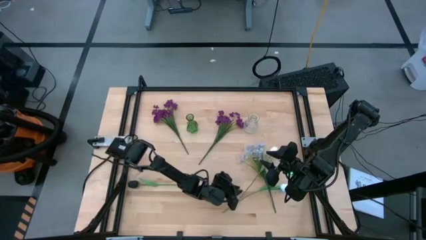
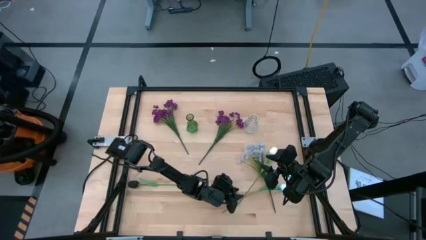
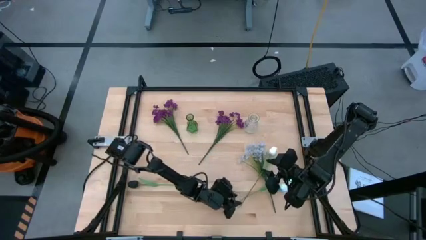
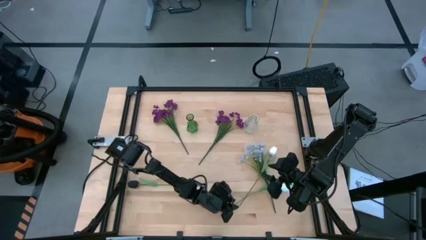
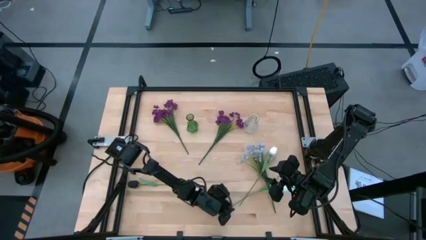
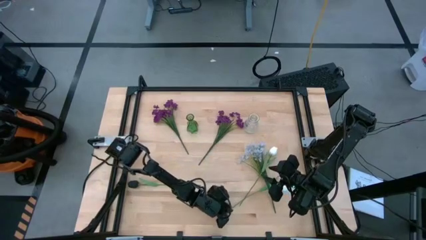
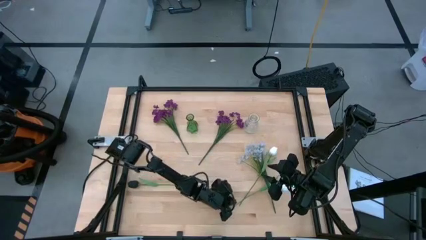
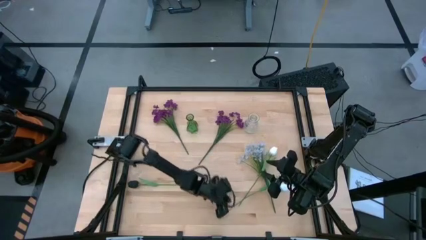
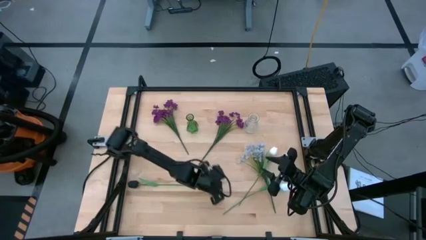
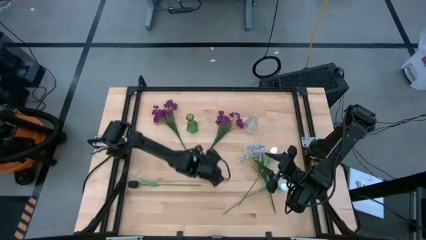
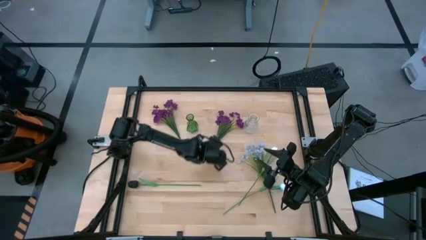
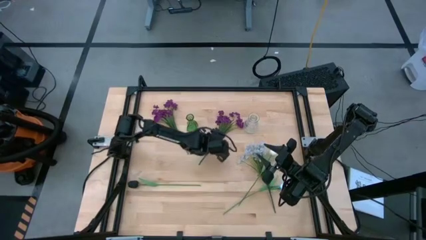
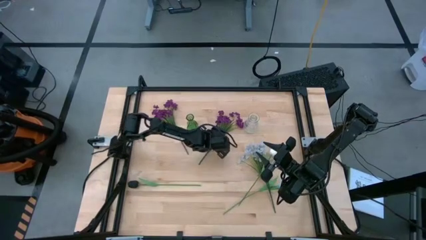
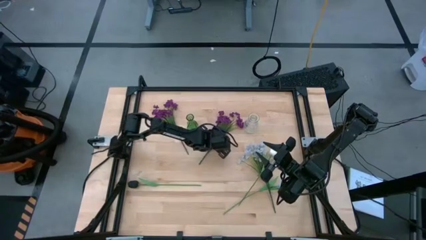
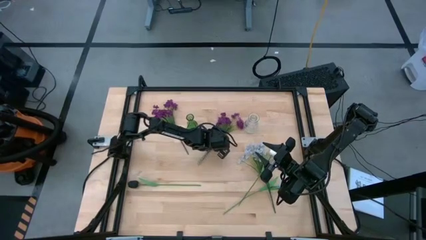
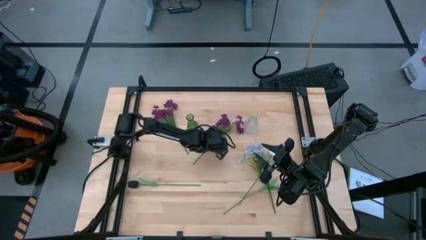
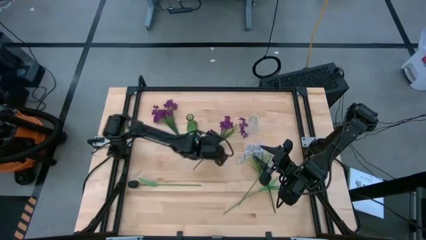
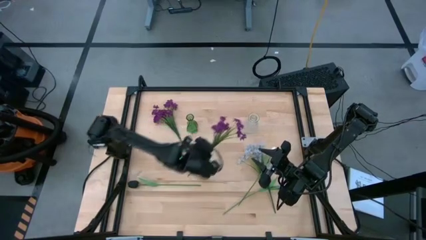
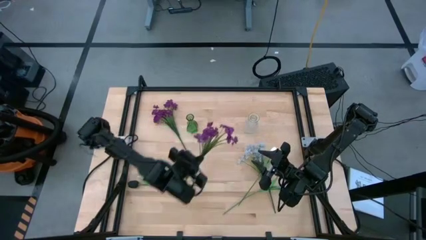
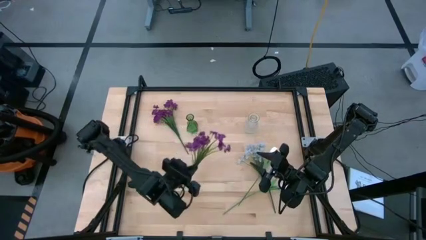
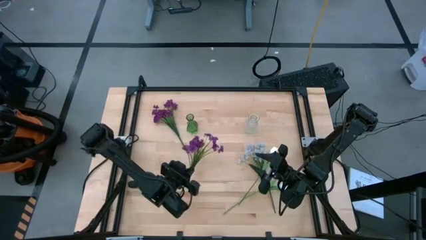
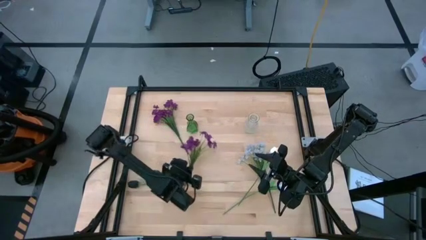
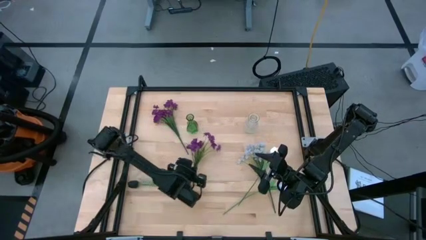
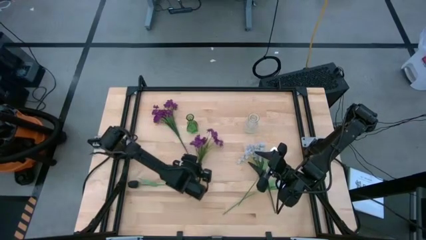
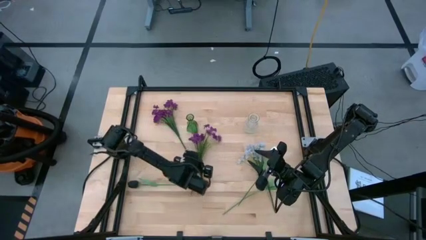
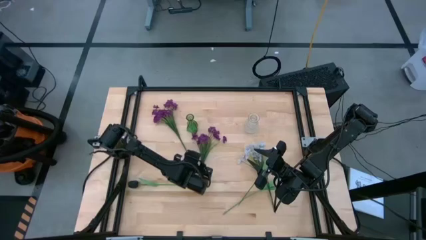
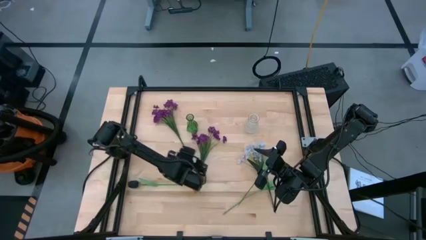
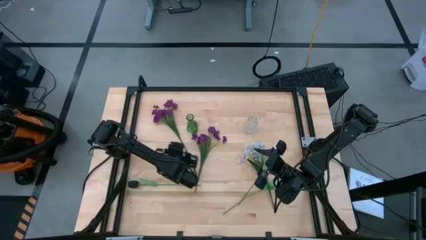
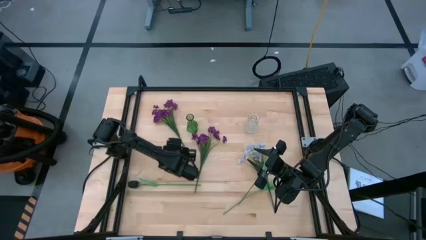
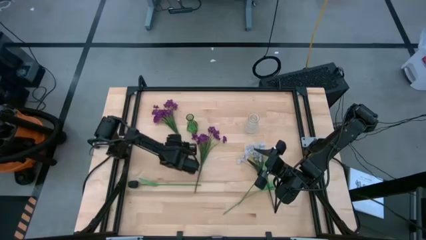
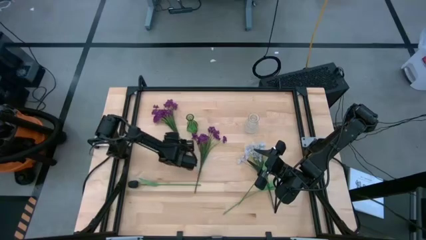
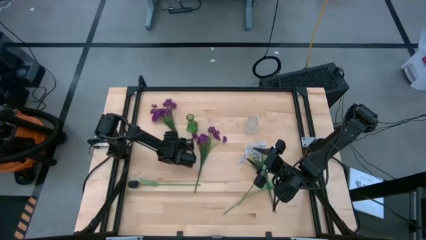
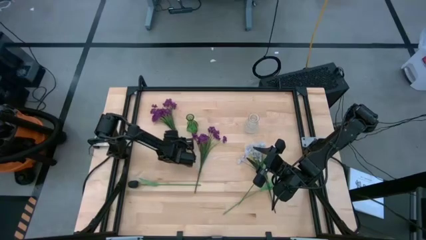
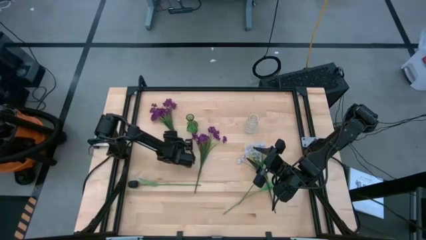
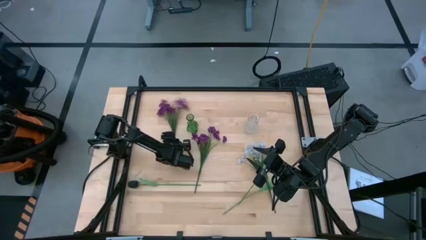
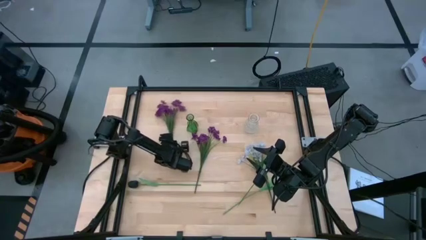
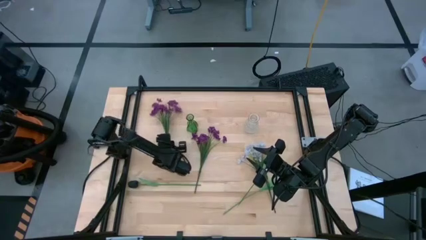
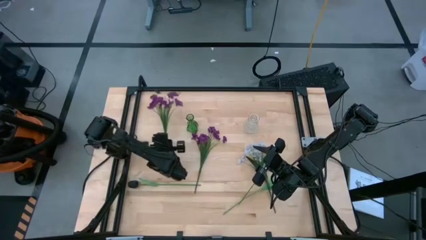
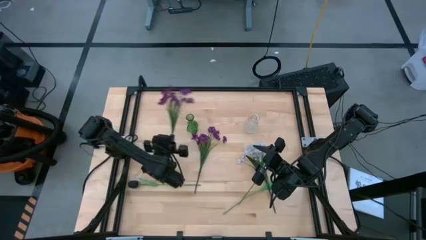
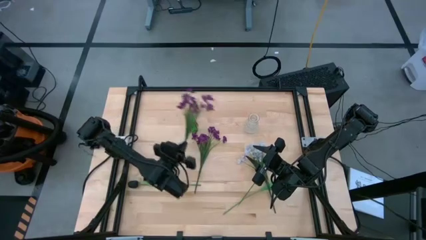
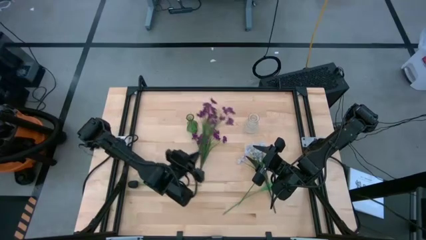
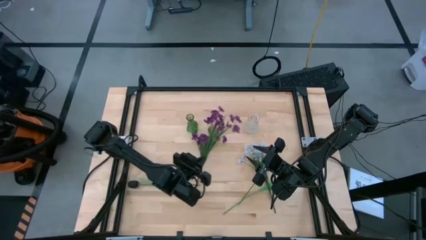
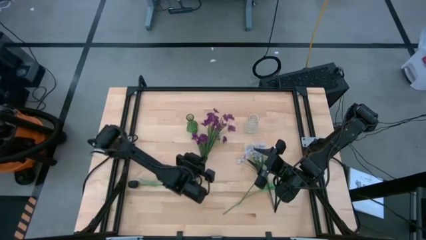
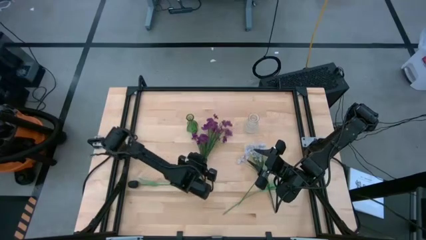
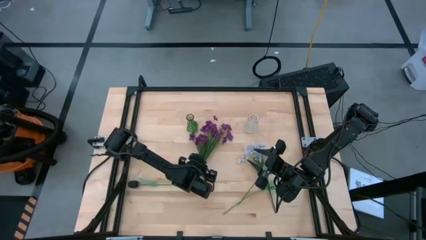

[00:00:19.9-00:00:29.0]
Task: Sort flowers into vase by color
Adjust the purple flowers

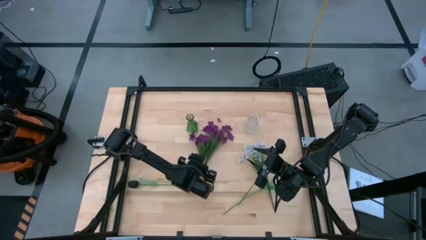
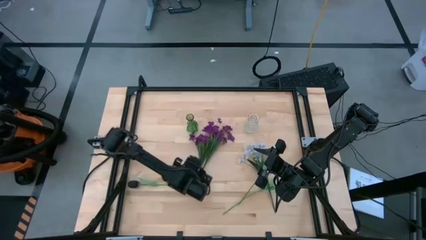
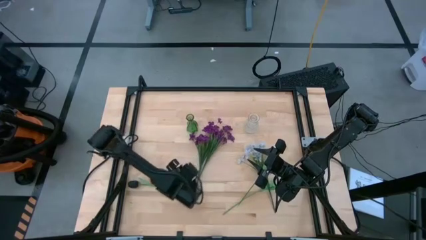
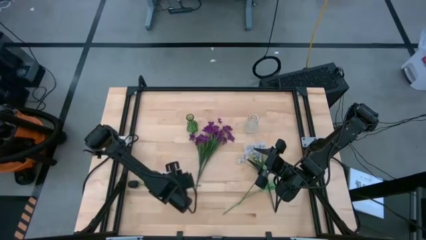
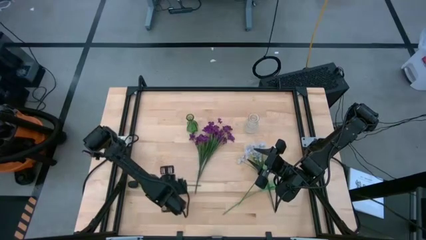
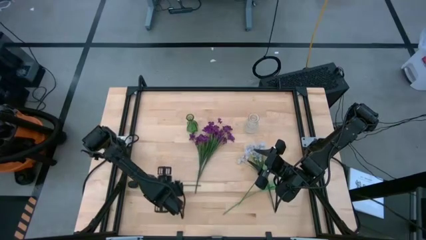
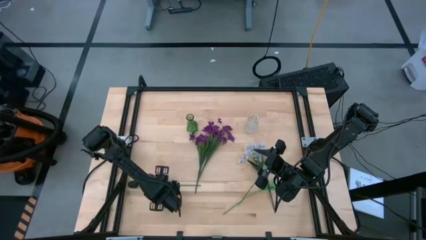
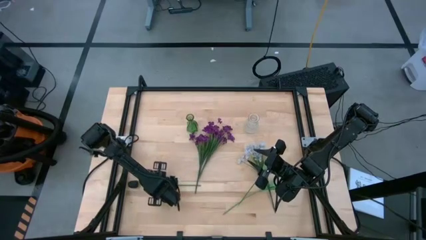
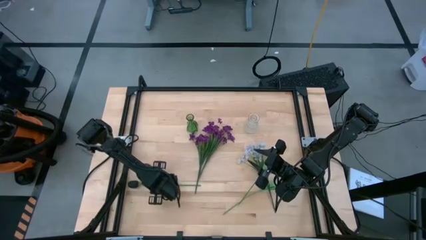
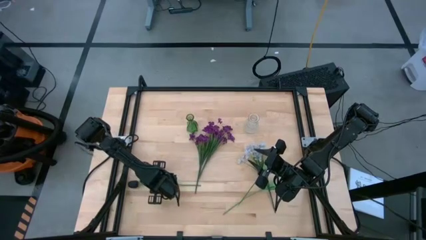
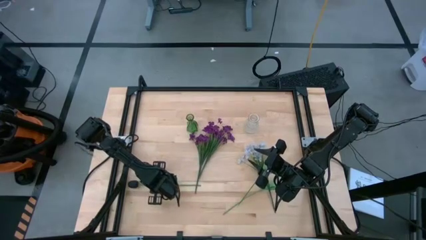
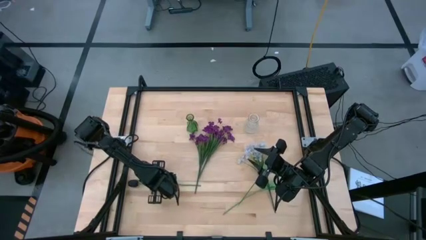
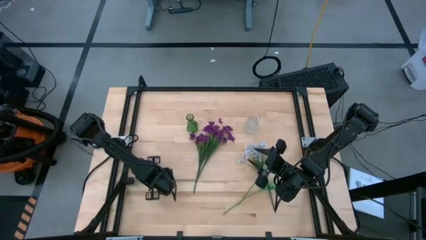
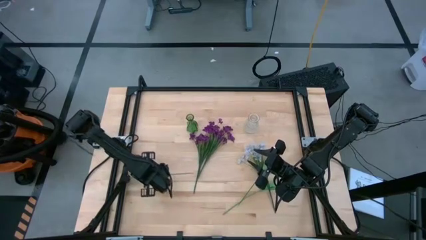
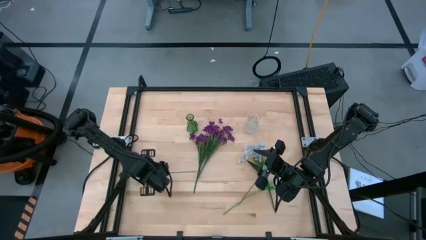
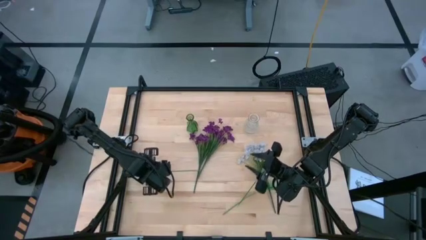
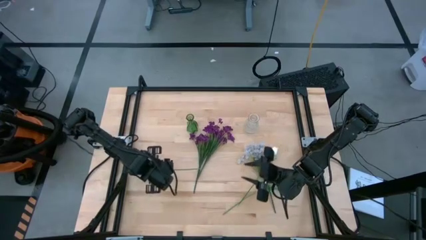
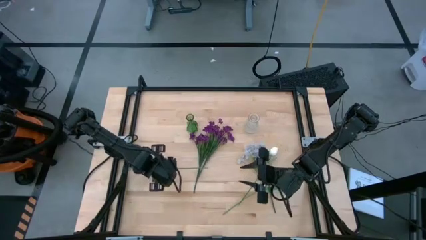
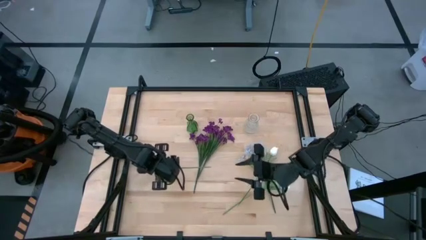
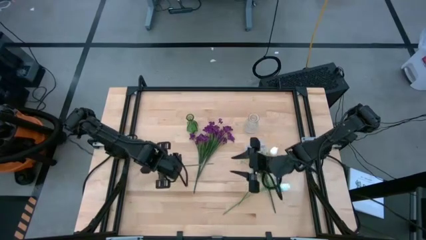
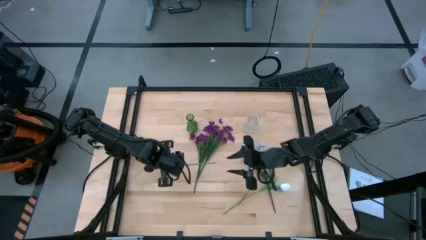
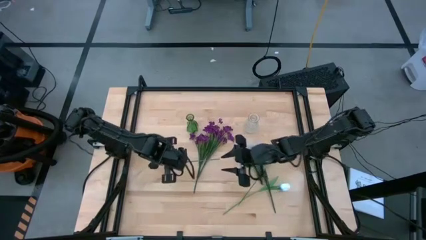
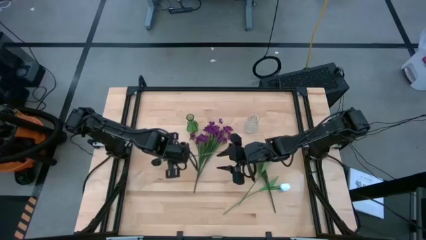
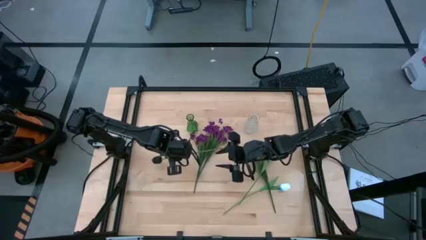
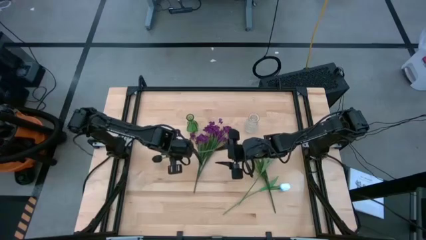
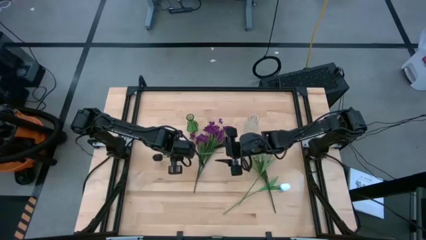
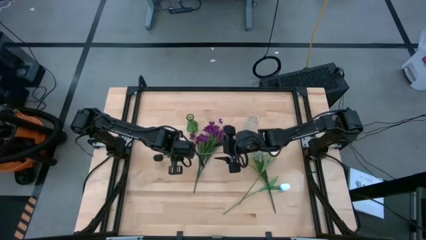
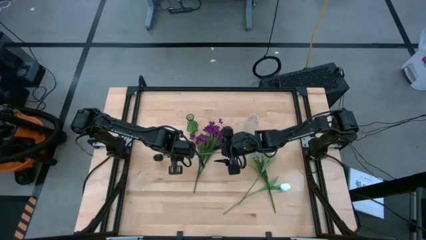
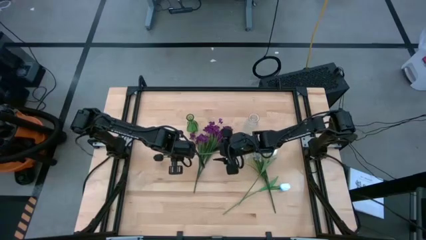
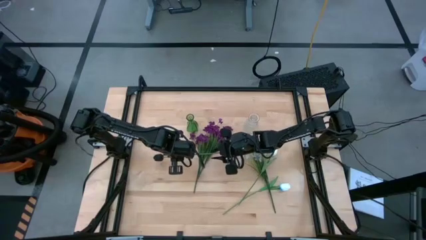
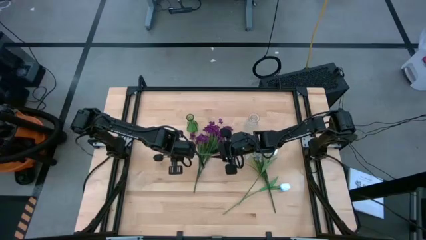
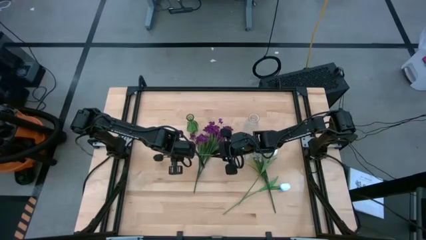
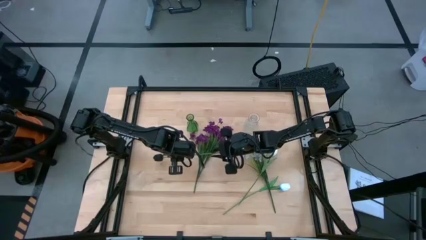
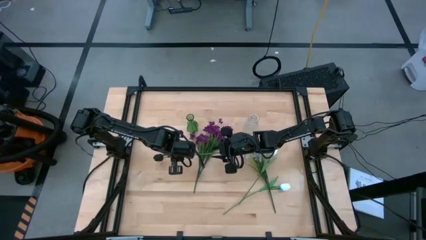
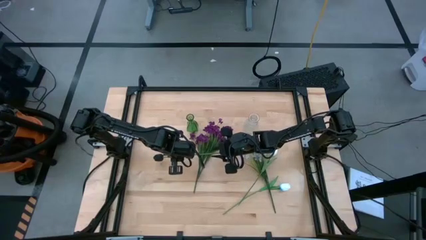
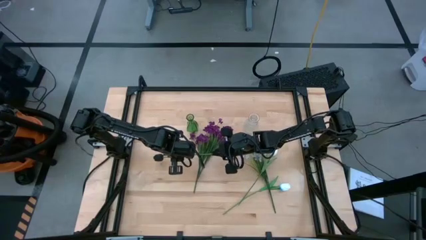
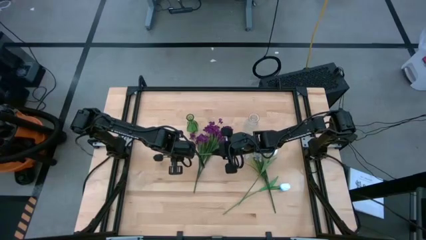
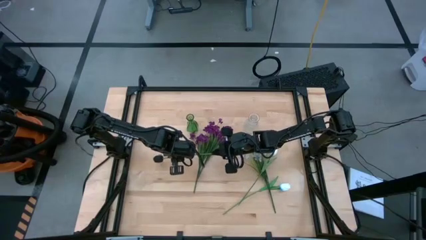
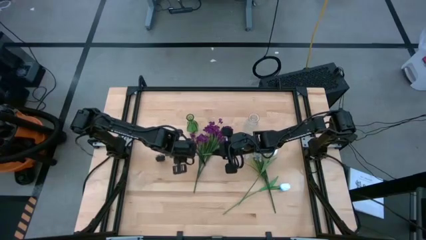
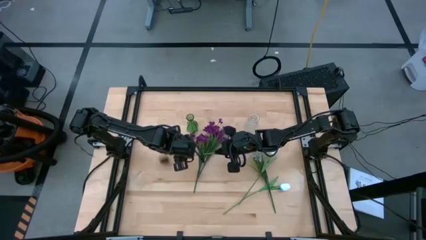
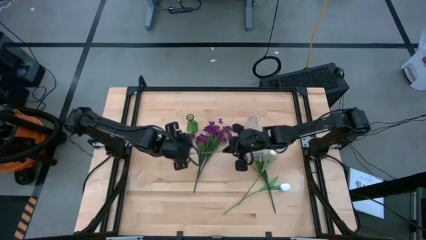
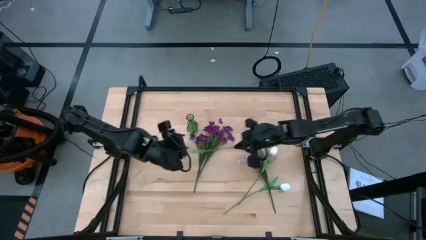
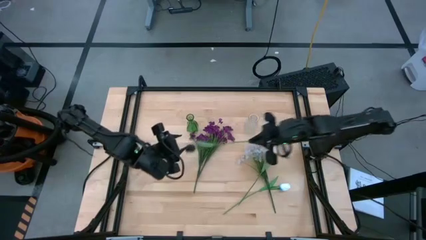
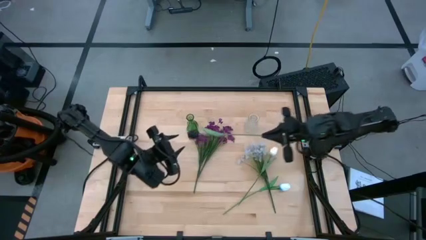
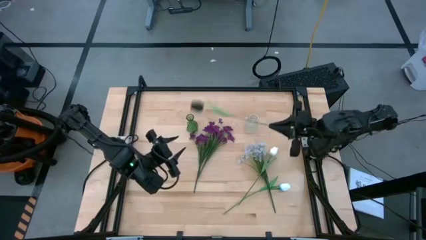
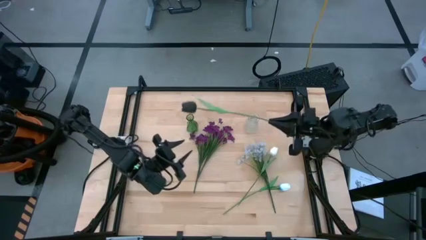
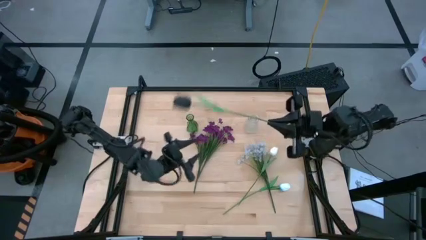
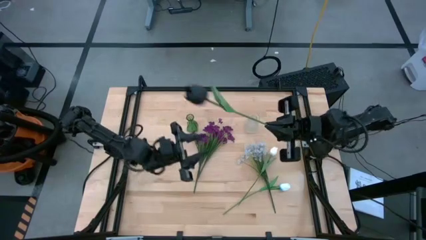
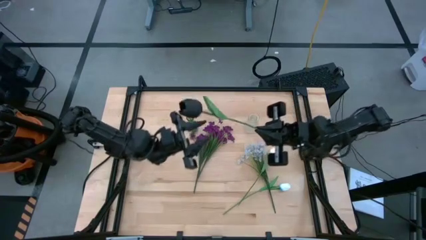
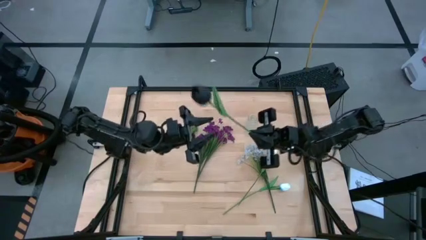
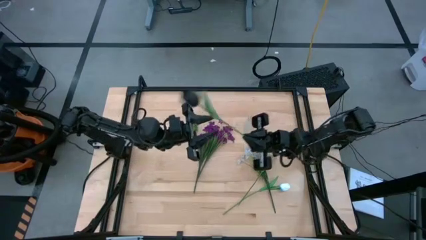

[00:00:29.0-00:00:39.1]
Put the black flower into the green vase
